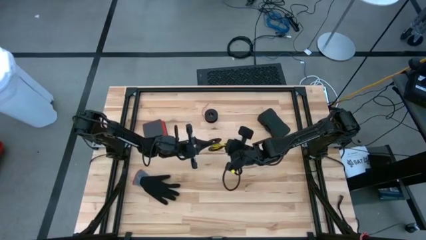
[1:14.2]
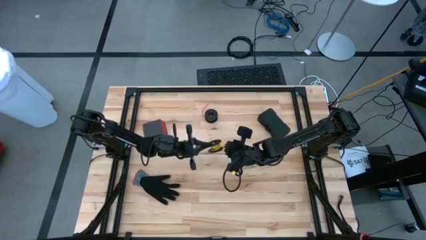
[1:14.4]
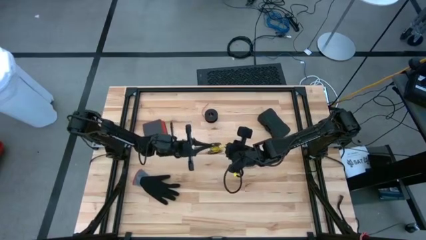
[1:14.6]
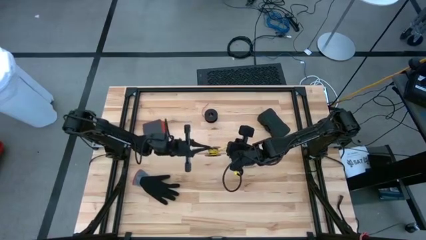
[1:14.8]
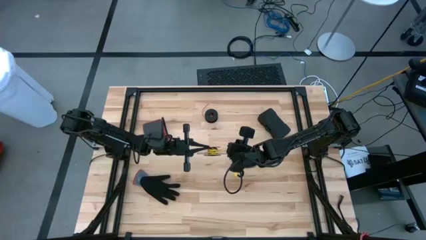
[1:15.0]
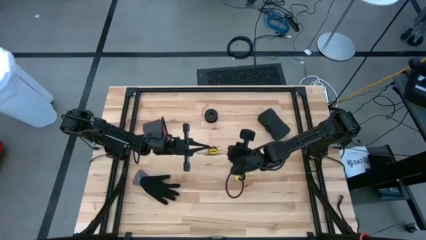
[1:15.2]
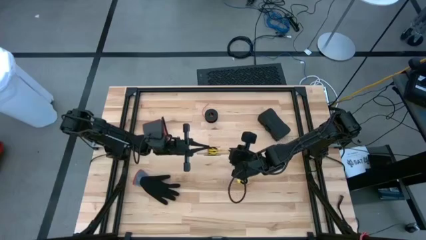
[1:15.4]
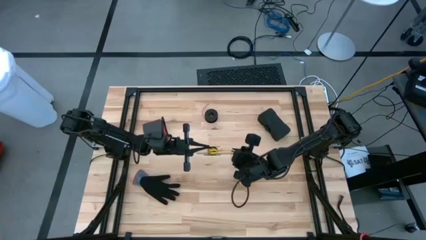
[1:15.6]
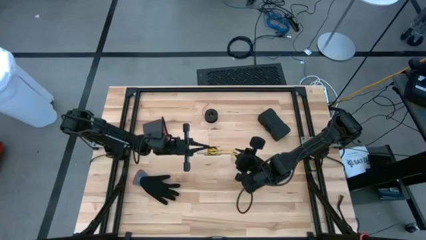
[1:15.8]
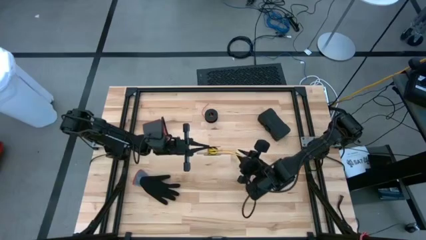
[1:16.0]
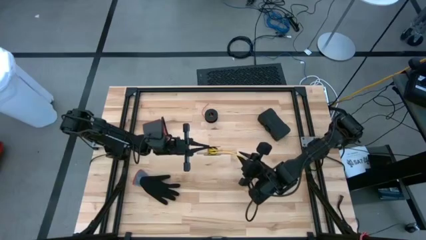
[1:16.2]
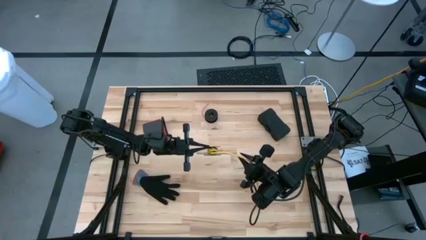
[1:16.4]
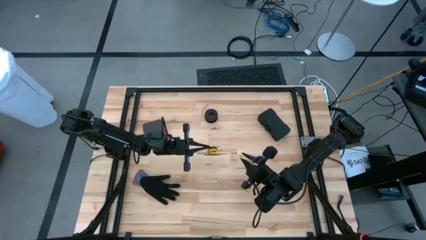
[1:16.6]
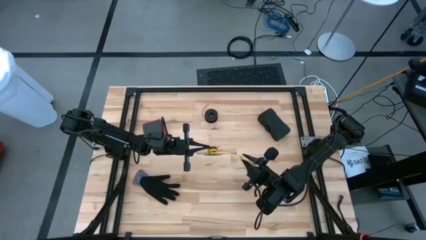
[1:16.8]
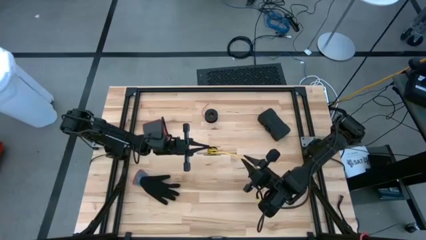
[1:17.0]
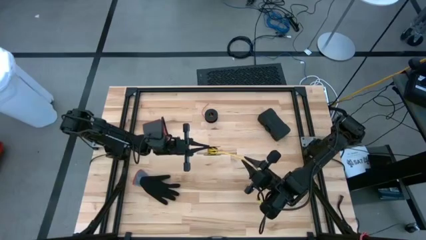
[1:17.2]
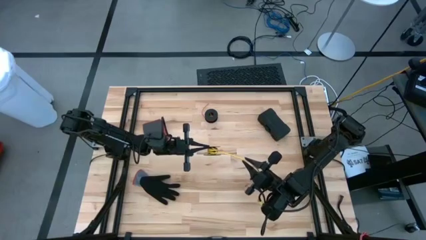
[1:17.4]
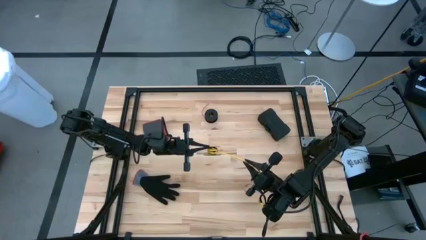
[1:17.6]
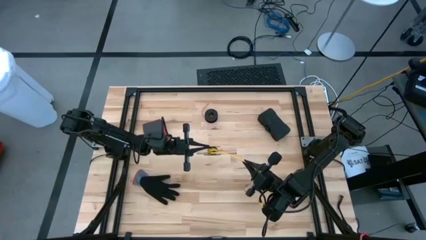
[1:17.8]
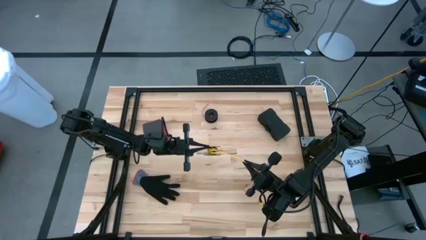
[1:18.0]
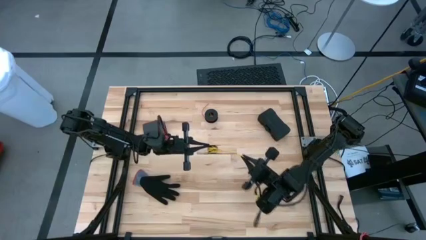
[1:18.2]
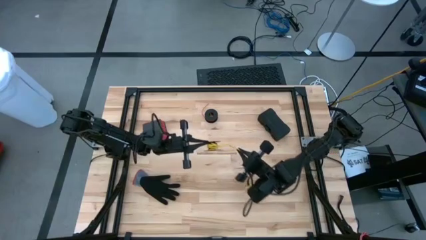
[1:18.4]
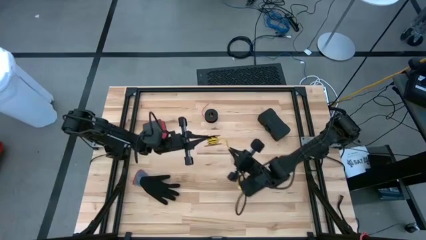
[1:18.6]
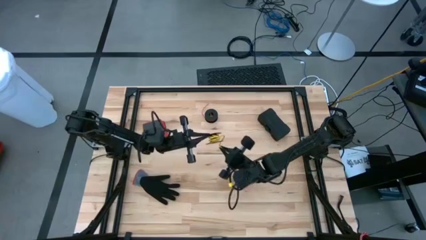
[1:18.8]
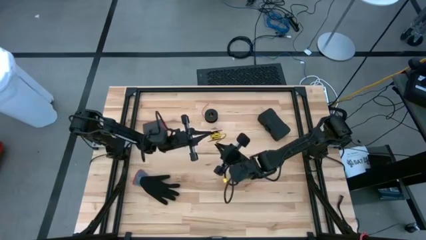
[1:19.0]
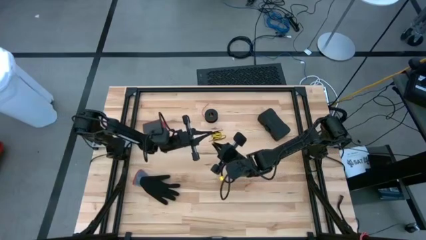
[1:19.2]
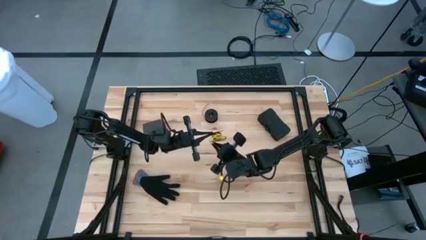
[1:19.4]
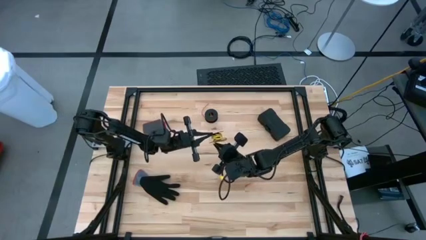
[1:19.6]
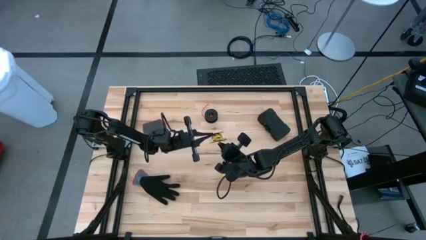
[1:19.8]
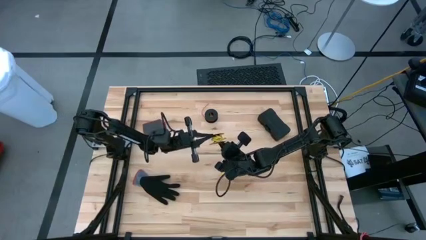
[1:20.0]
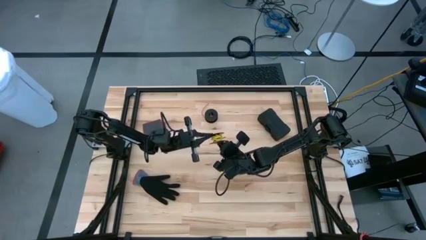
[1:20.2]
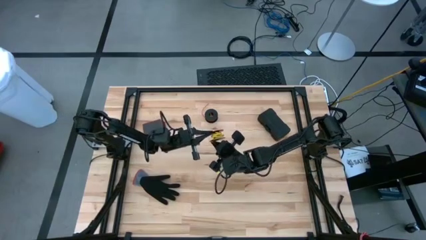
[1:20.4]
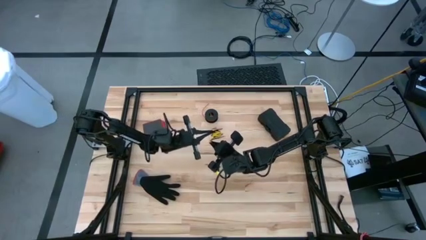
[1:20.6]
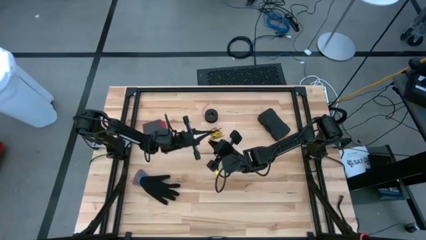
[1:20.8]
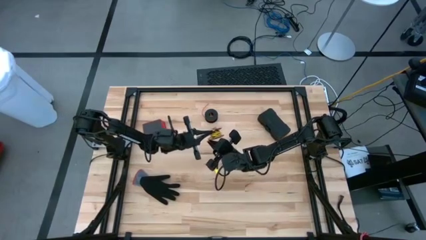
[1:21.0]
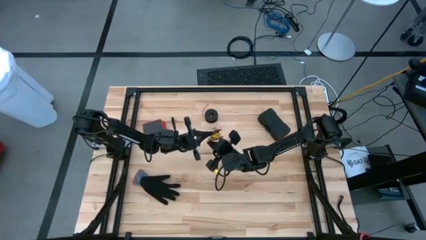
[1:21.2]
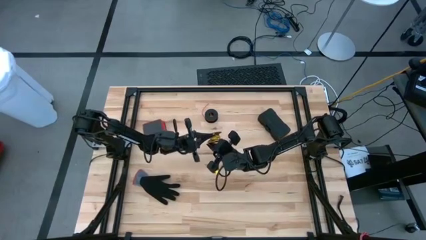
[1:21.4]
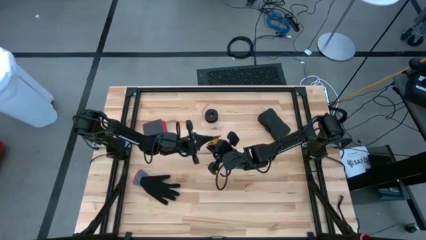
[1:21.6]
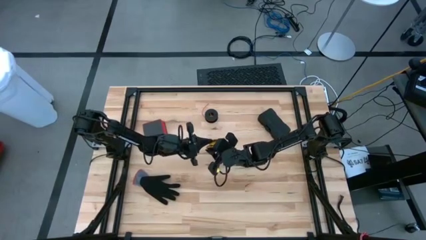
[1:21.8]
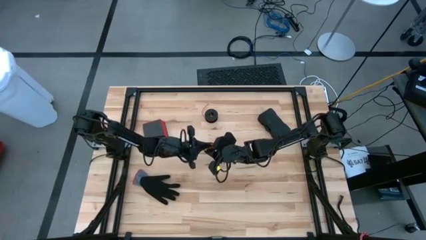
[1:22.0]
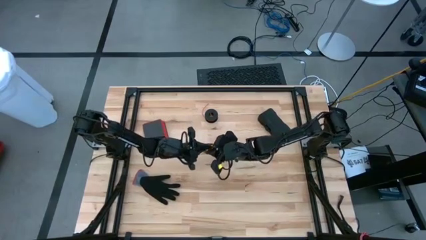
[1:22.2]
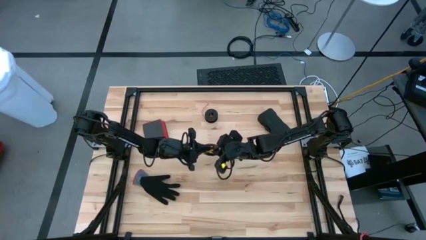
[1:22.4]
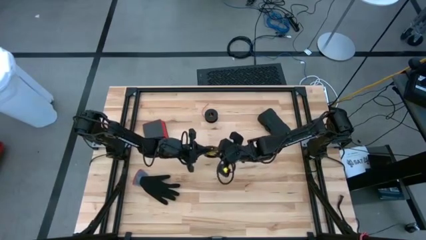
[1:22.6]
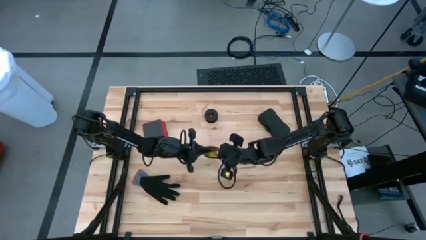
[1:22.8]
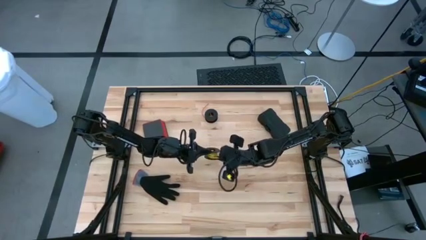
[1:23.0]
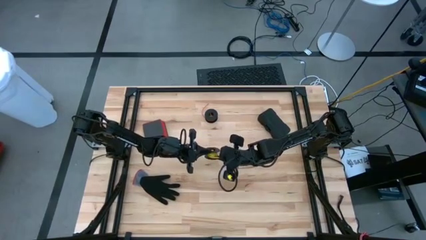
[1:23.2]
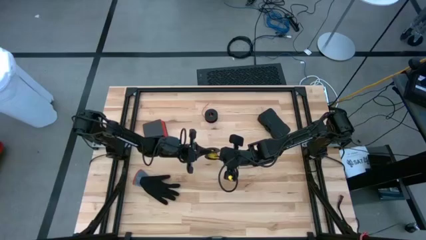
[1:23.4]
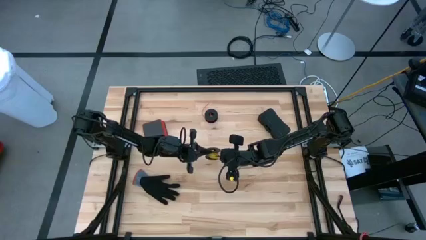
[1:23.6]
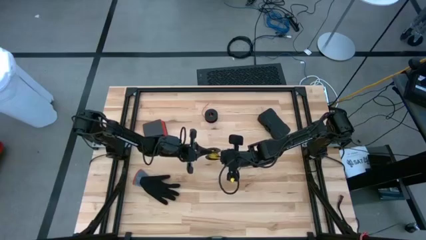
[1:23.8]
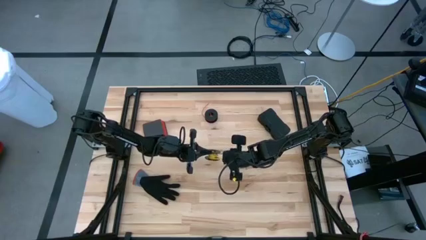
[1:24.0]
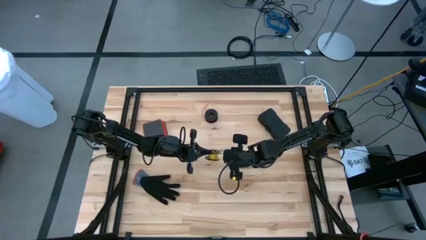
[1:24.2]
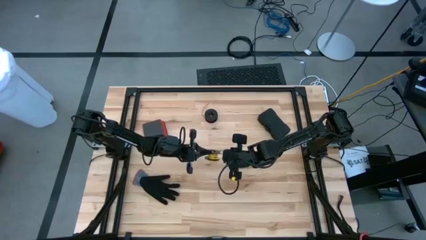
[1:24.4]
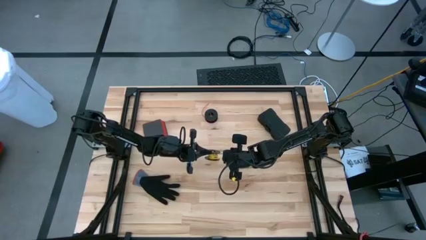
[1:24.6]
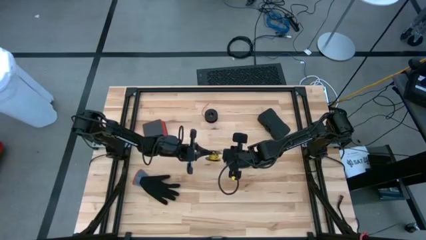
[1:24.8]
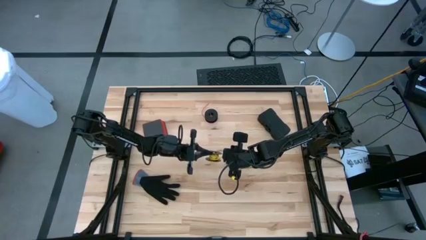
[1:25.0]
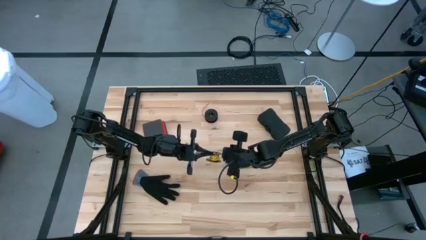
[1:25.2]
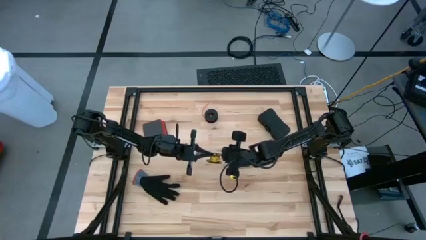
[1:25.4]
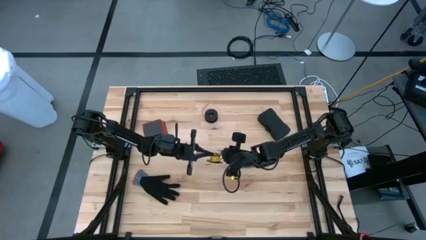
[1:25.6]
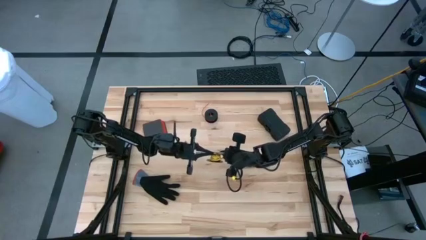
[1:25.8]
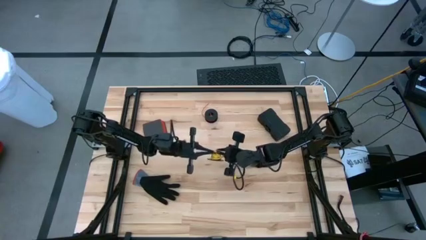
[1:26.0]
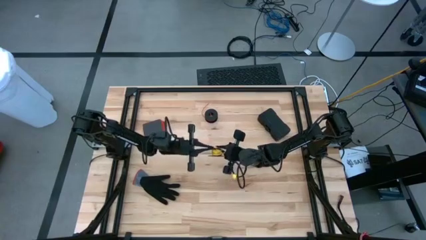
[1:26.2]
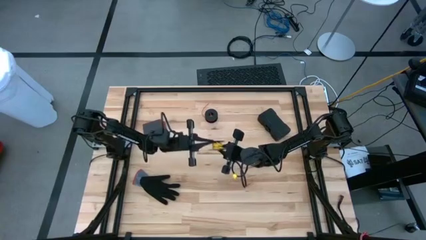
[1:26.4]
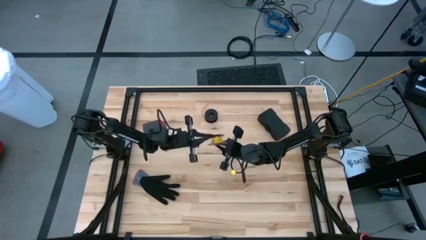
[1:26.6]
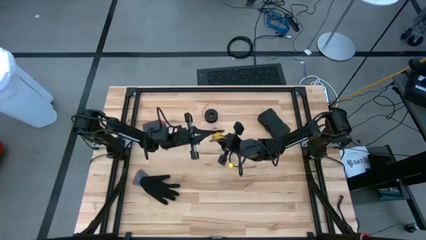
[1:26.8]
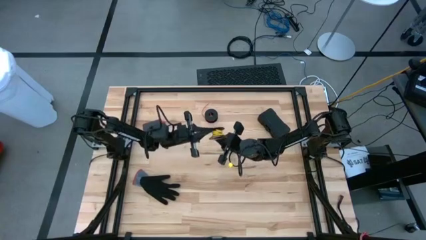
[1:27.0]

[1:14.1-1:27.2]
Task: Coil cords
Coil the yellow wire into the spool

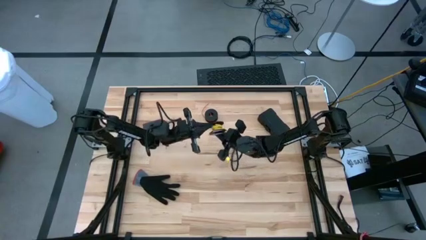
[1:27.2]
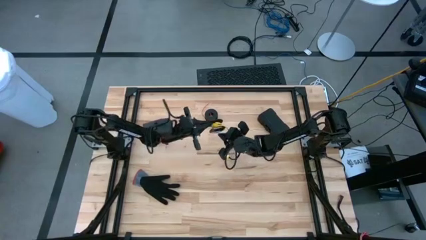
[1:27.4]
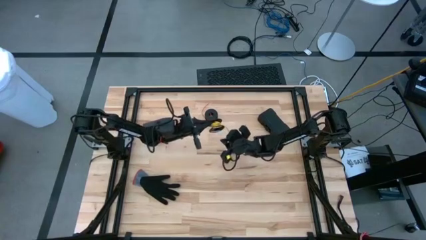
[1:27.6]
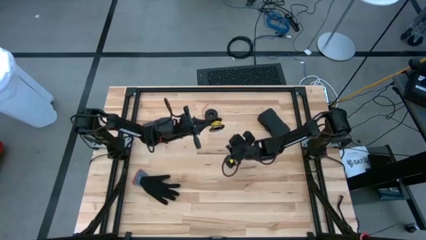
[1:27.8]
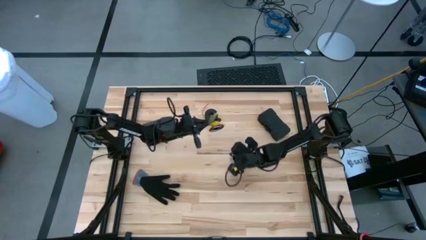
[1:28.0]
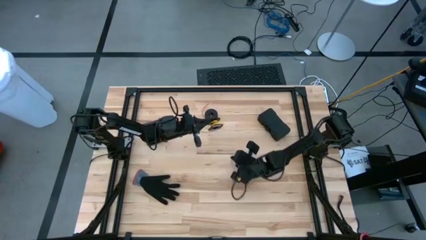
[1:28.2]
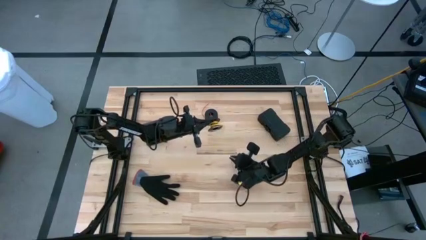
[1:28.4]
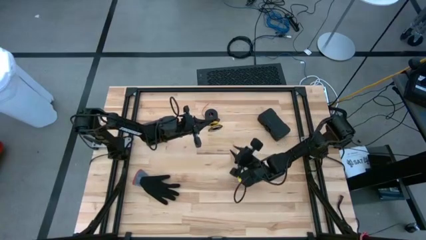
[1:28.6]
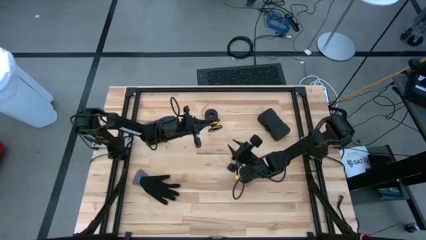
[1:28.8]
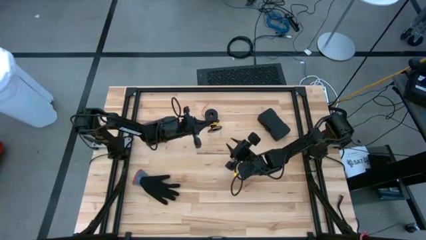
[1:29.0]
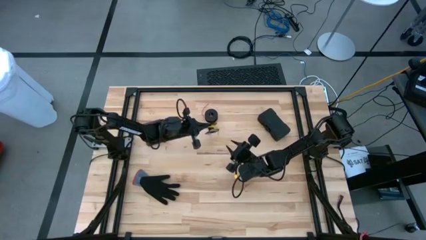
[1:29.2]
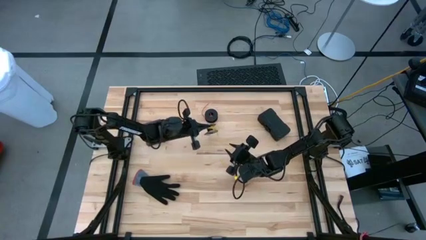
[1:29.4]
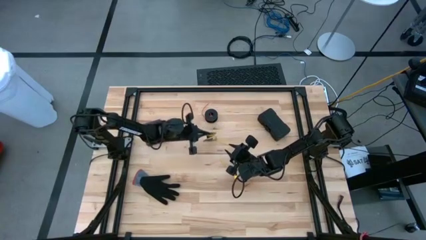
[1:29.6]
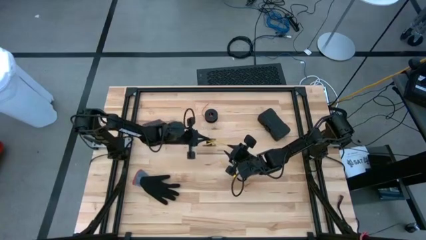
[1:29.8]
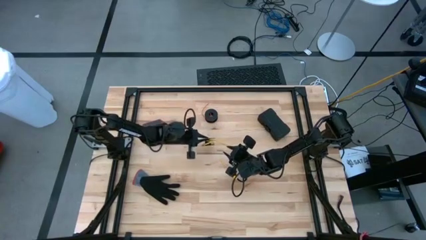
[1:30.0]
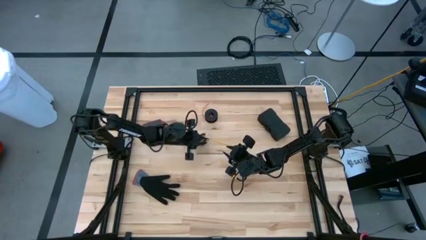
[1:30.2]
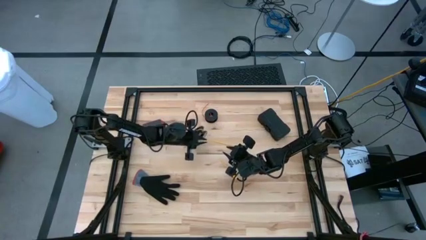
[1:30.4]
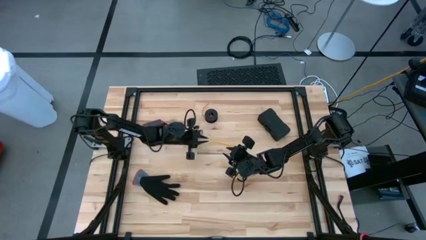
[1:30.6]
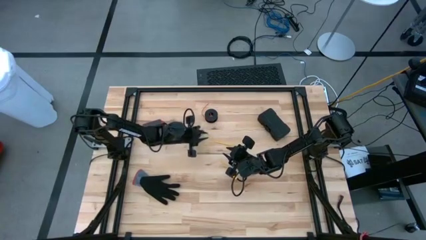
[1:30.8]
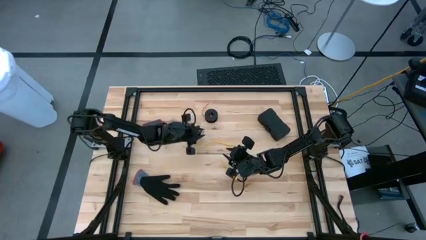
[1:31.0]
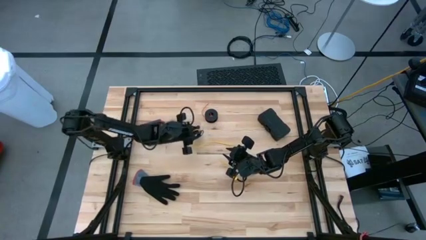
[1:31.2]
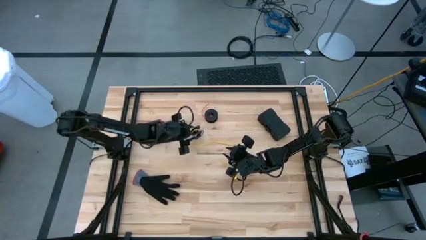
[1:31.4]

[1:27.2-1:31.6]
Coil the yellow wire on the spool
